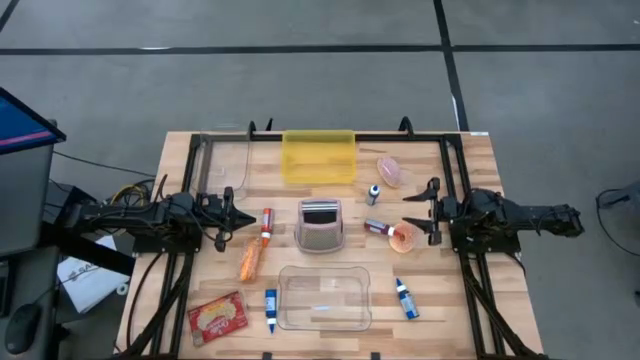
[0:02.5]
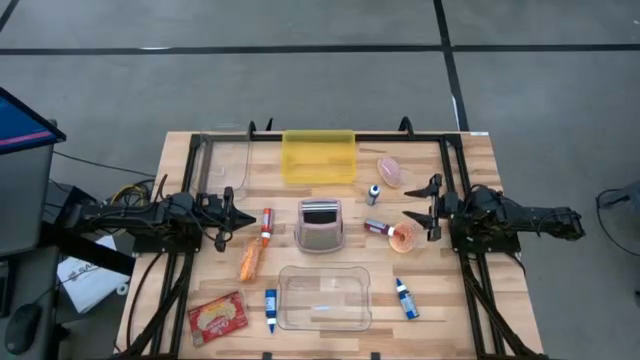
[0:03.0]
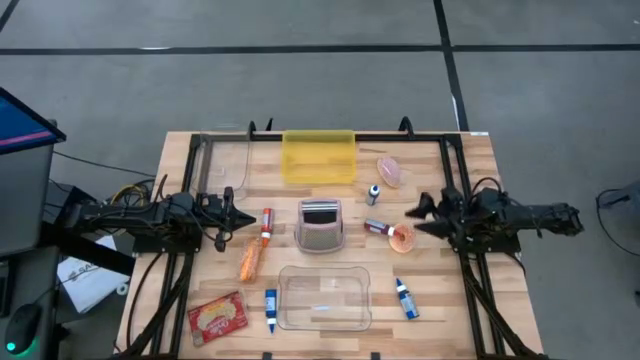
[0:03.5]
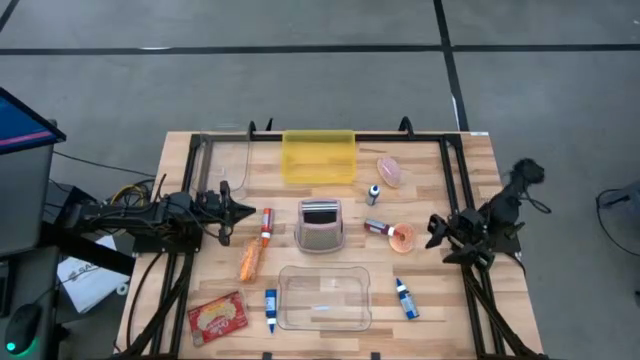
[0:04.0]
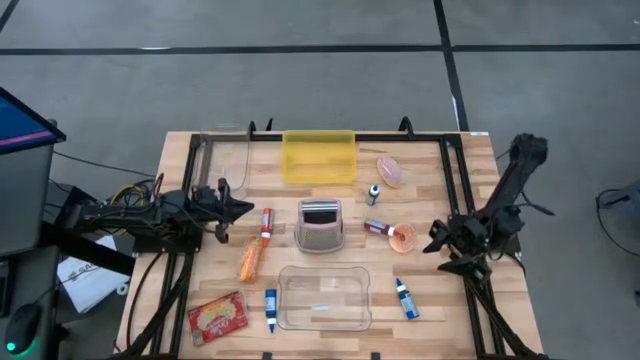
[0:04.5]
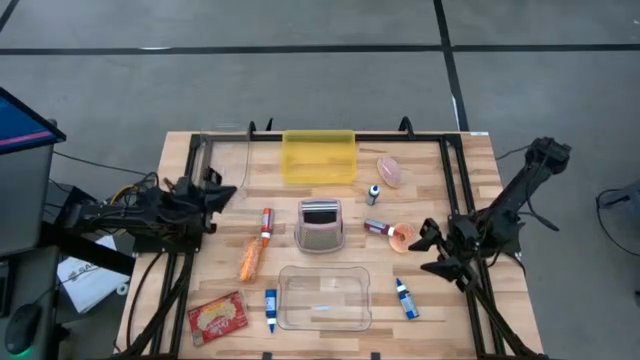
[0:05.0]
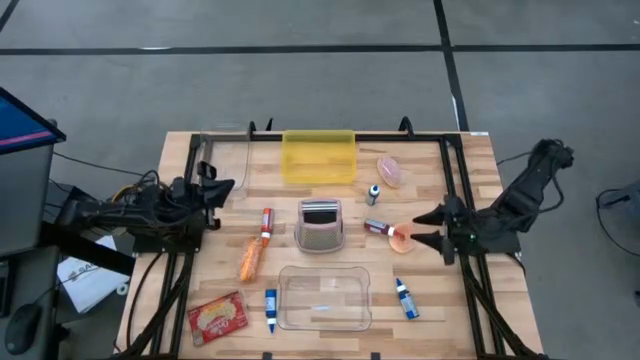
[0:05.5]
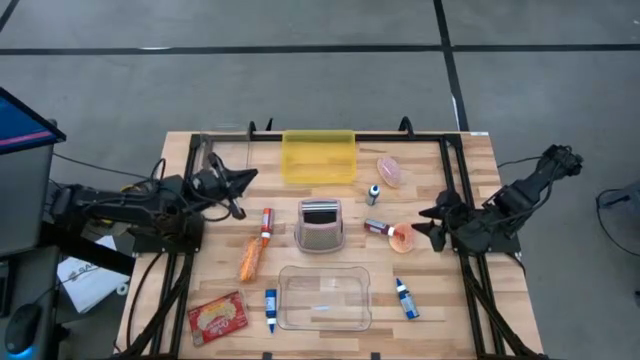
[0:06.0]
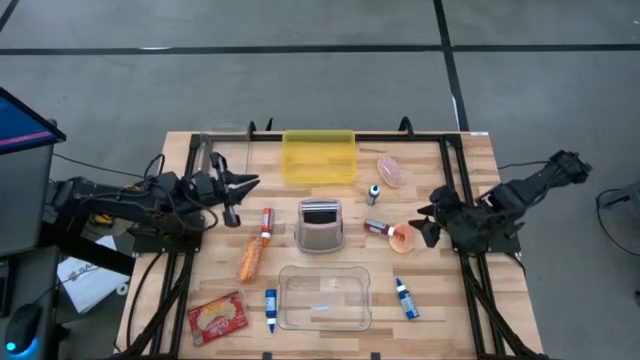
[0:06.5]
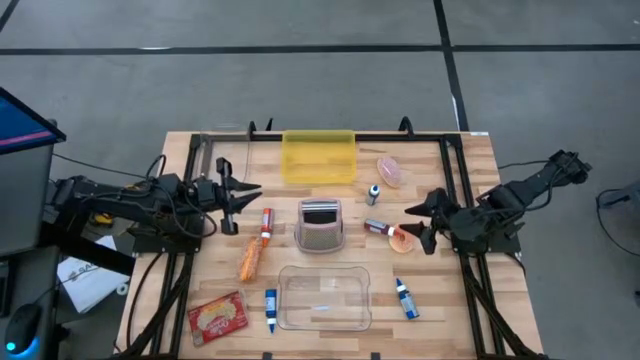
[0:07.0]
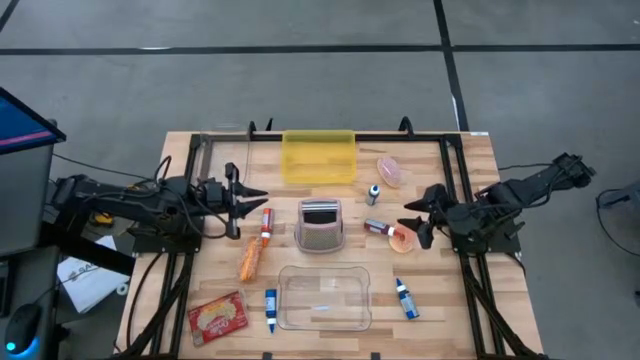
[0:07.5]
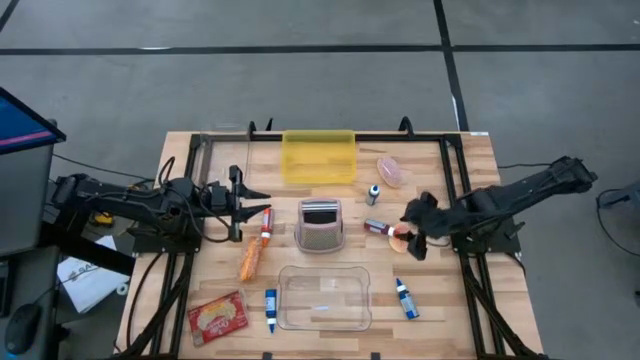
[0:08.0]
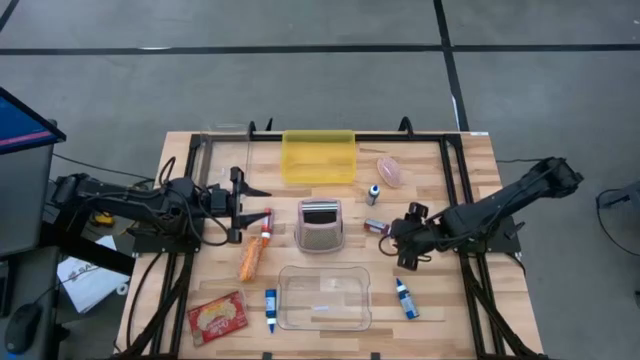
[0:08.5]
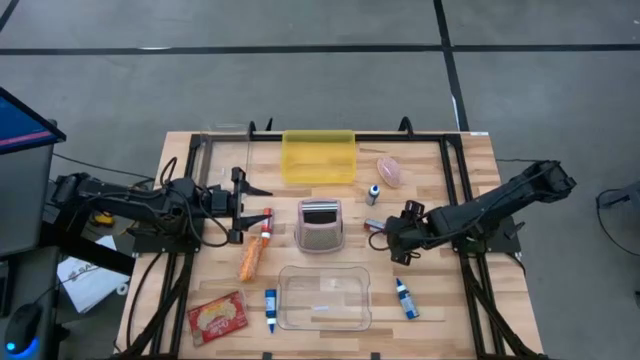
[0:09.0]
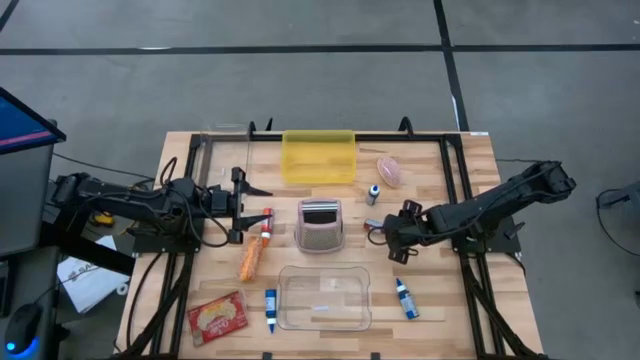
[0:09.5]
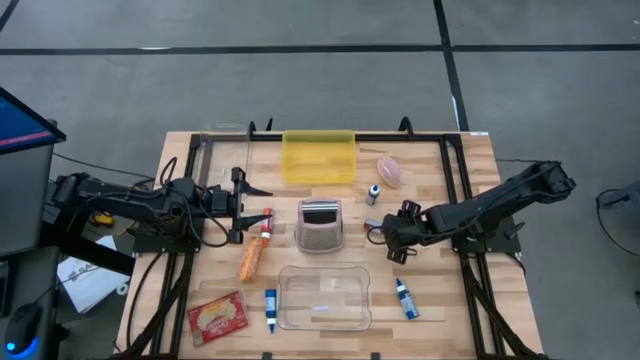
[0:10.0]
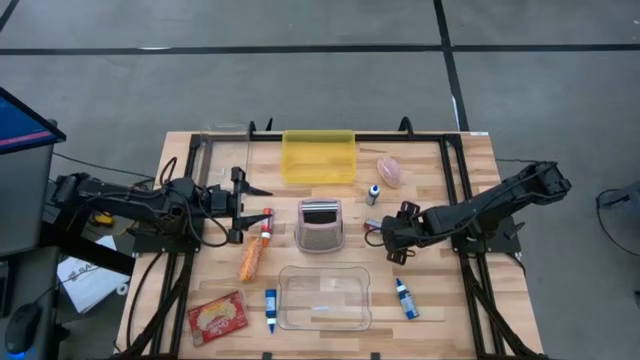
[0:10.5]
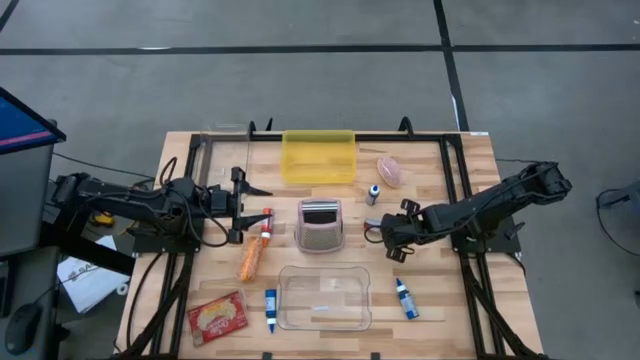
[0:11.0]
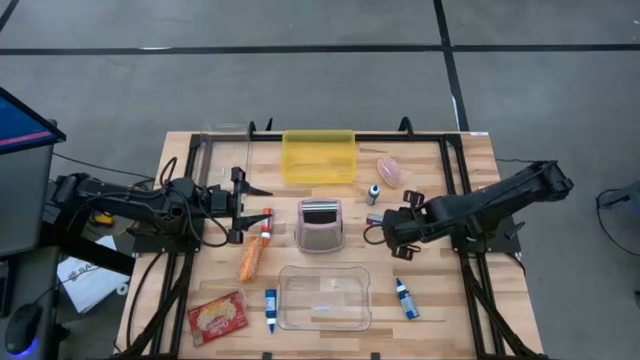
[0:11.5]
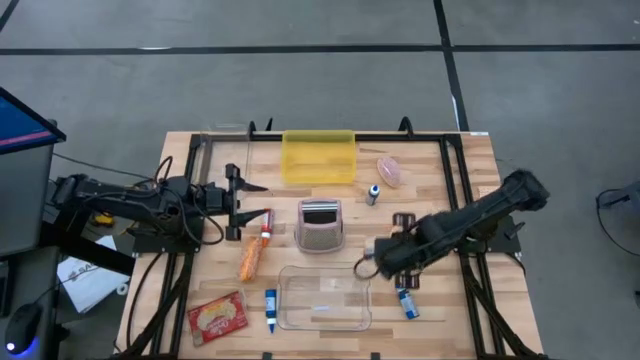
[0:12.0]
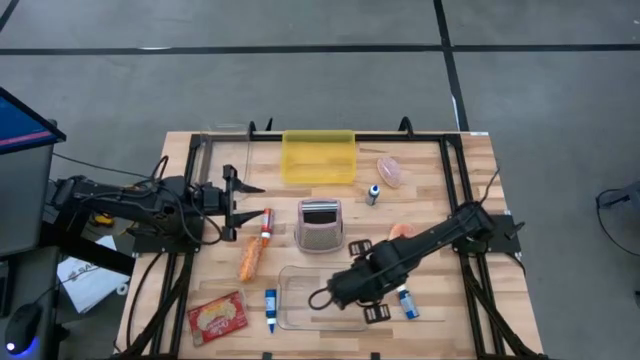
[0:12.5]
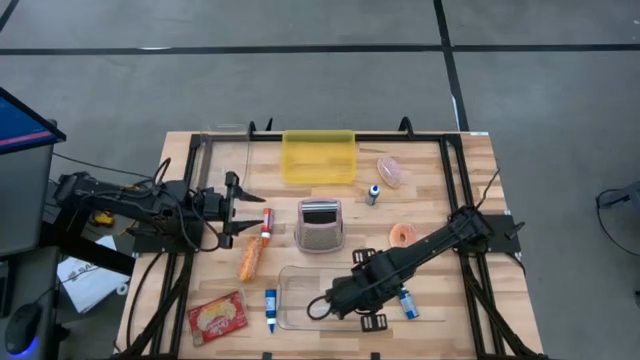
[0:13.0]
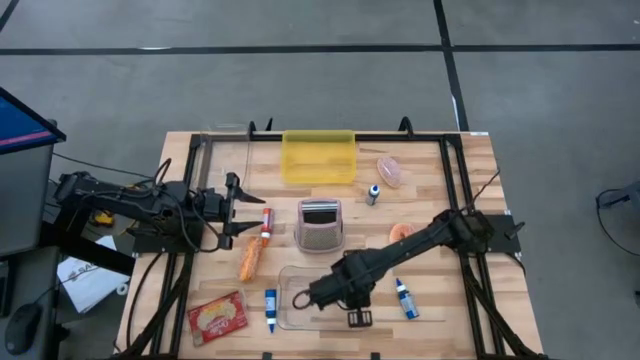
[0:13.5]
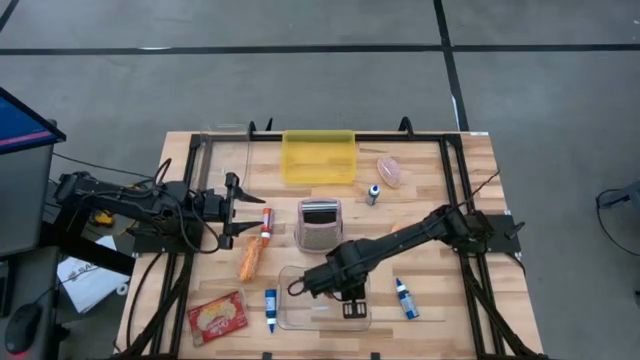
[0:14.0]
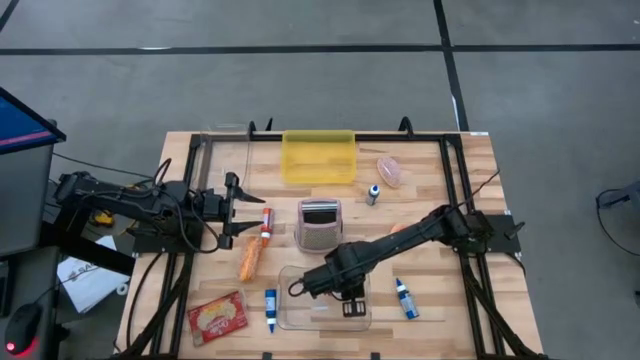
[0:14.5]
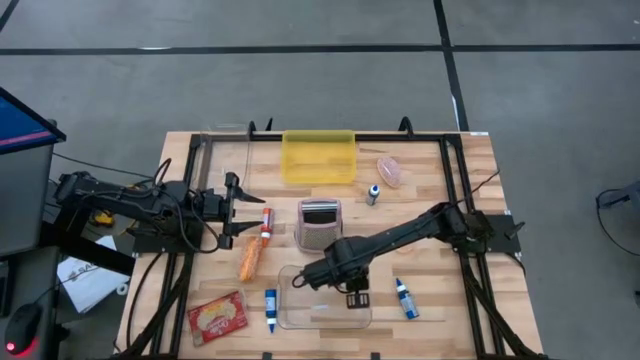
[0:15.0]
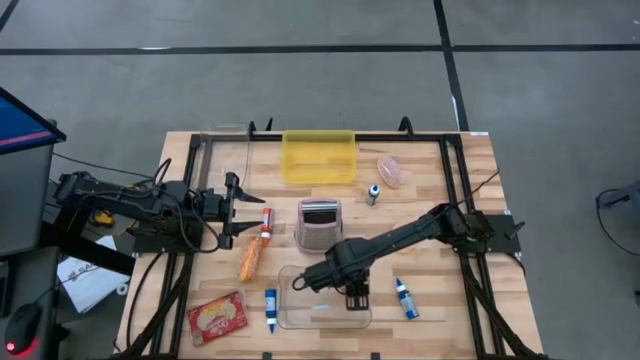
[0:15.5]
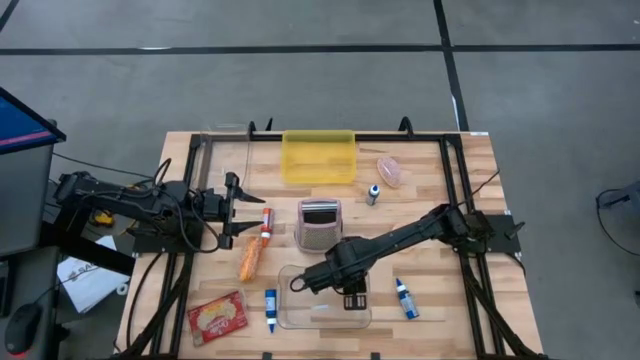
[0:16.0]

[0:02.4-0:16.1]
Put the red food coloring bottle into the bottom transparent bin
